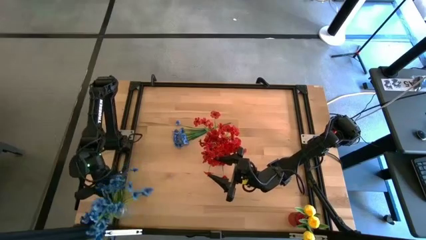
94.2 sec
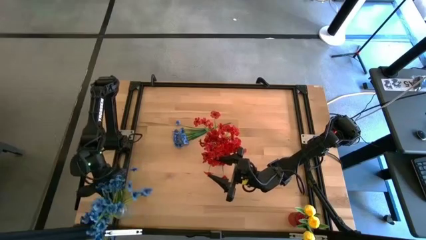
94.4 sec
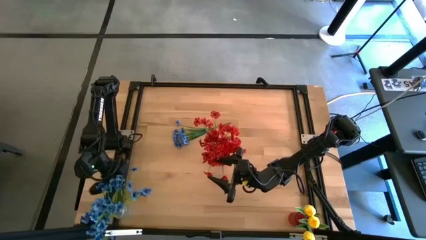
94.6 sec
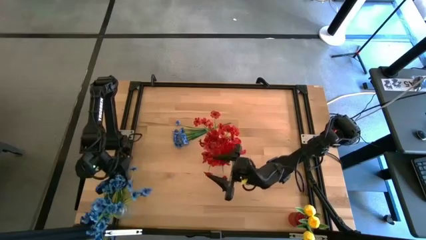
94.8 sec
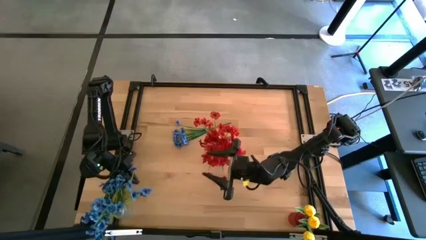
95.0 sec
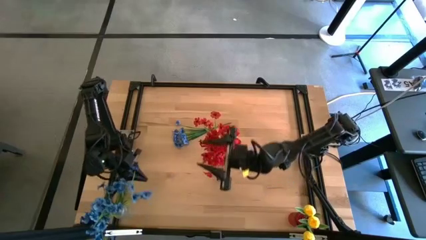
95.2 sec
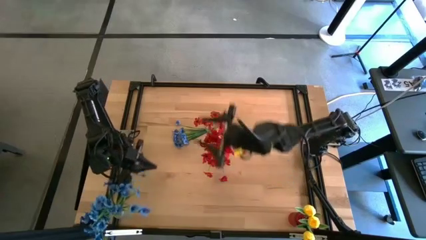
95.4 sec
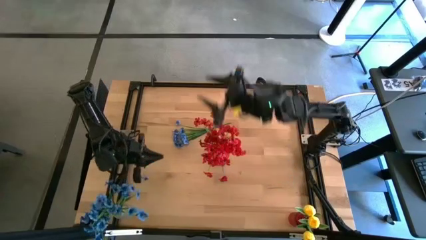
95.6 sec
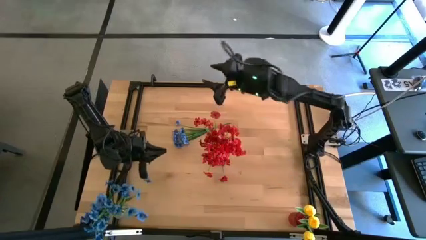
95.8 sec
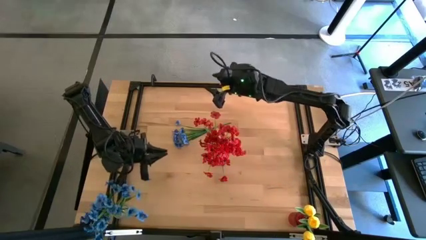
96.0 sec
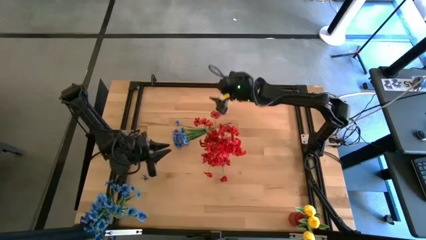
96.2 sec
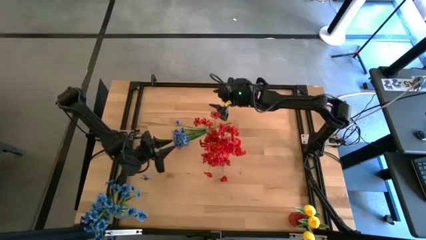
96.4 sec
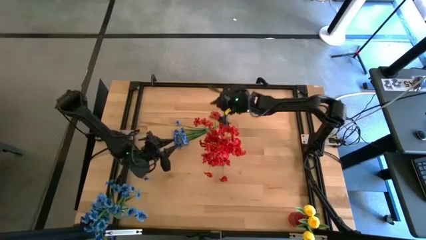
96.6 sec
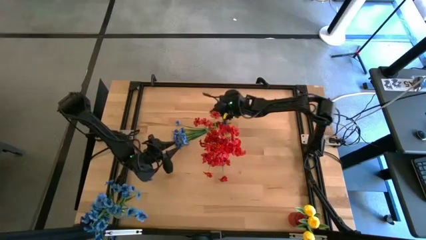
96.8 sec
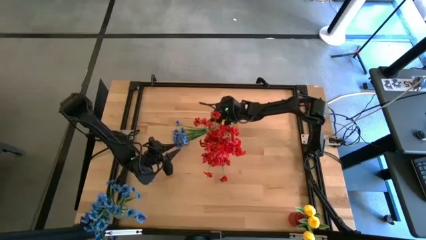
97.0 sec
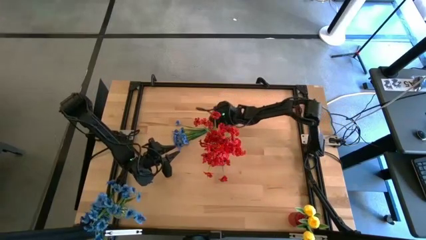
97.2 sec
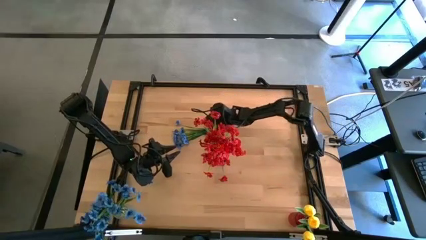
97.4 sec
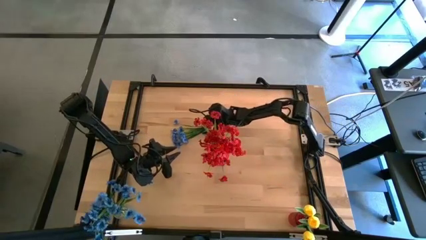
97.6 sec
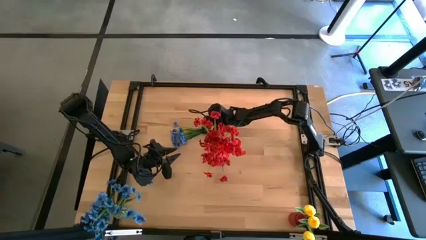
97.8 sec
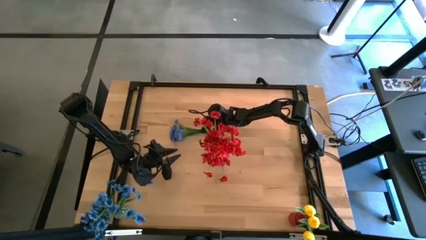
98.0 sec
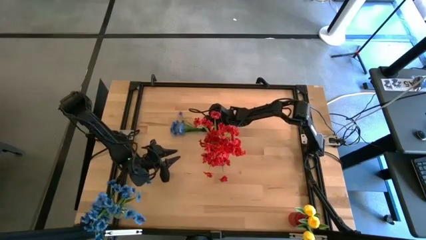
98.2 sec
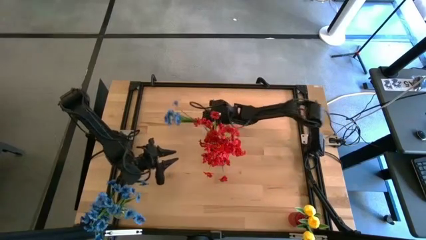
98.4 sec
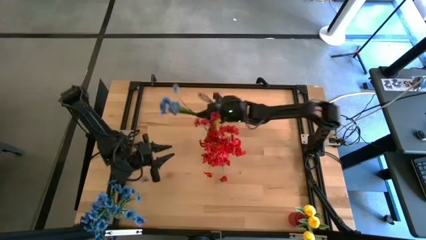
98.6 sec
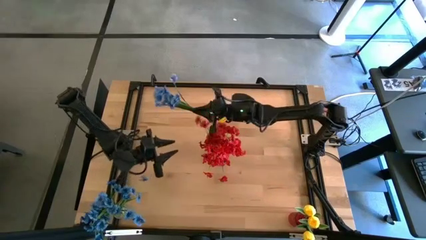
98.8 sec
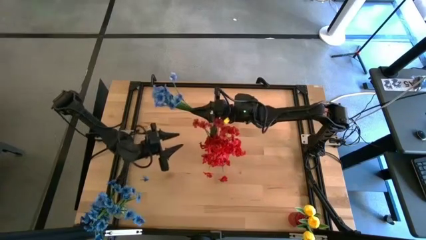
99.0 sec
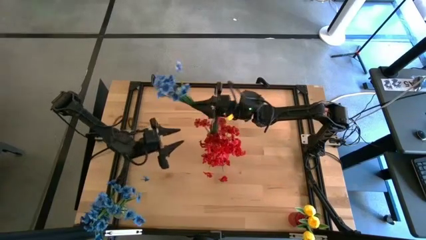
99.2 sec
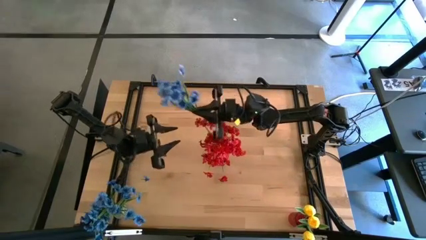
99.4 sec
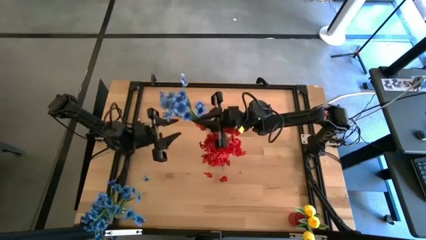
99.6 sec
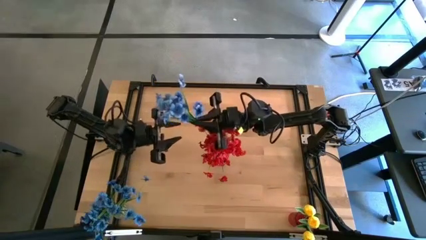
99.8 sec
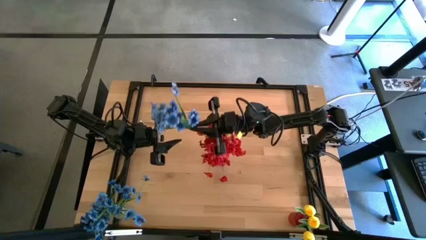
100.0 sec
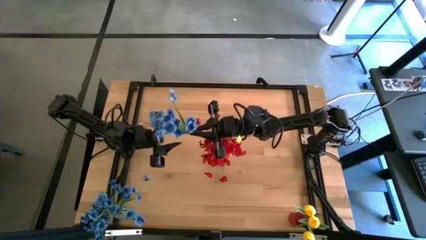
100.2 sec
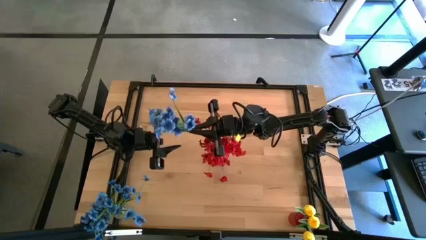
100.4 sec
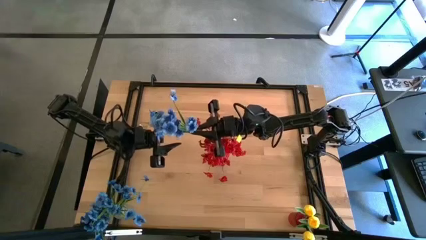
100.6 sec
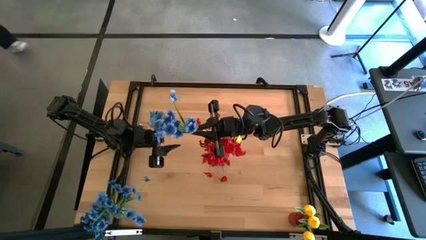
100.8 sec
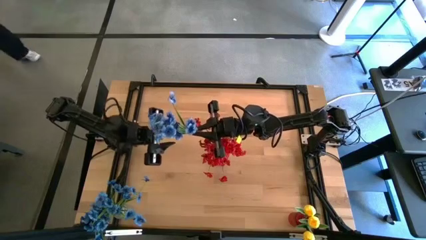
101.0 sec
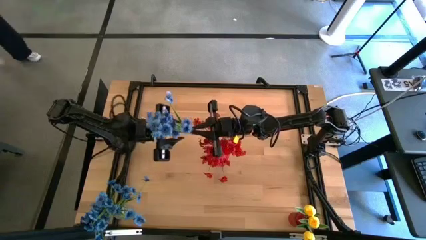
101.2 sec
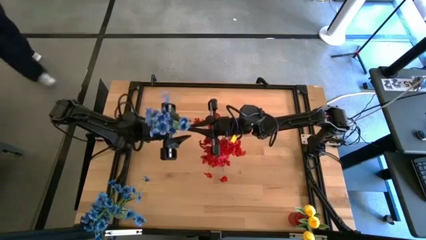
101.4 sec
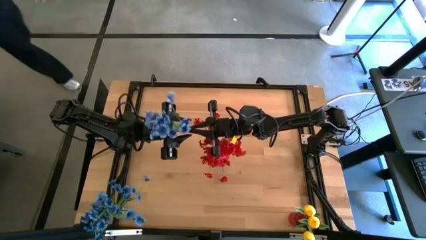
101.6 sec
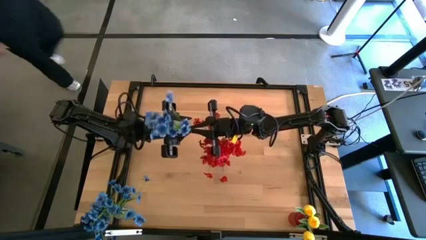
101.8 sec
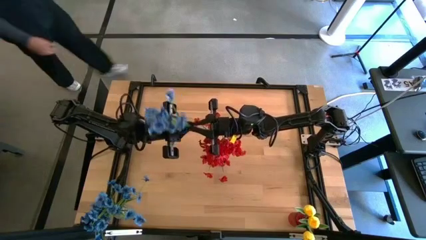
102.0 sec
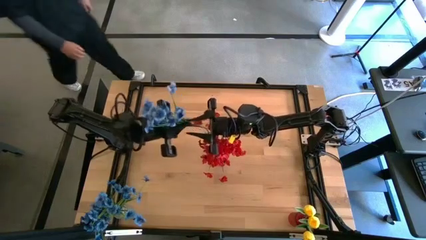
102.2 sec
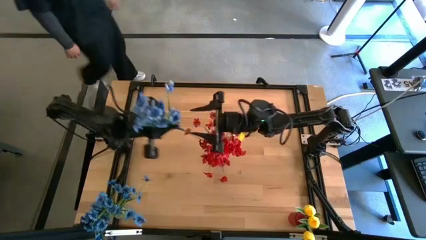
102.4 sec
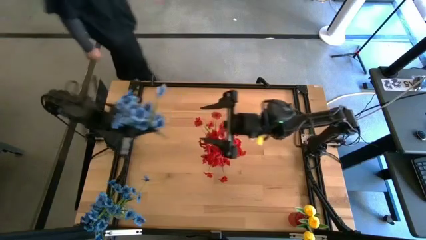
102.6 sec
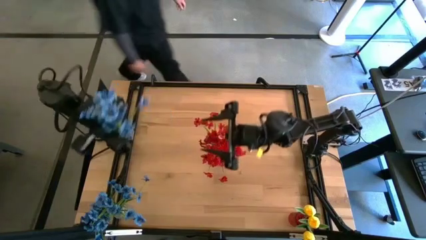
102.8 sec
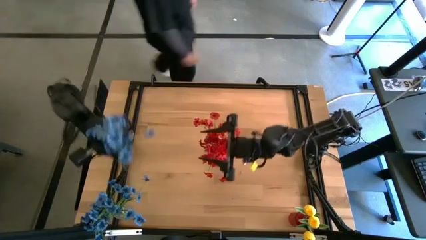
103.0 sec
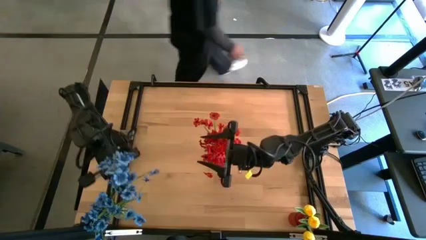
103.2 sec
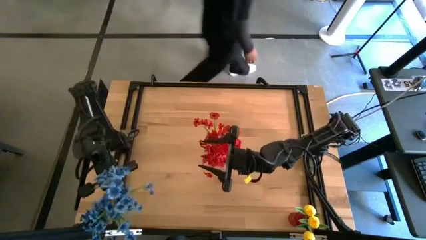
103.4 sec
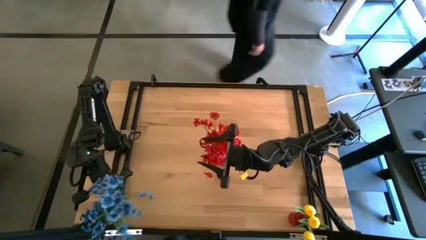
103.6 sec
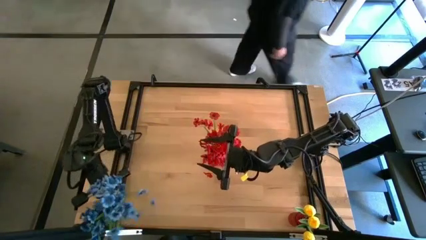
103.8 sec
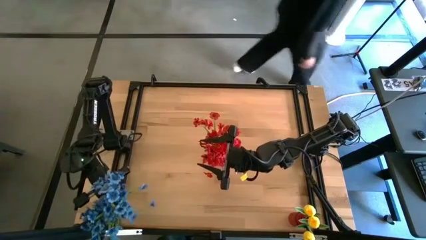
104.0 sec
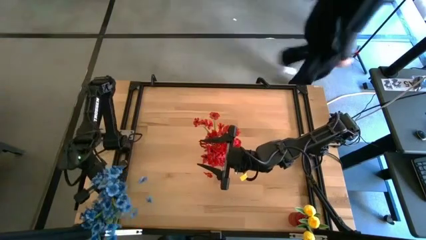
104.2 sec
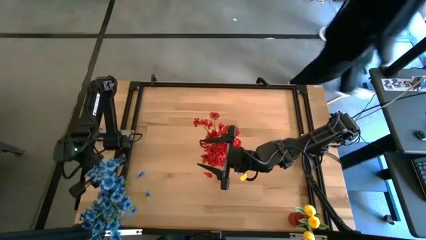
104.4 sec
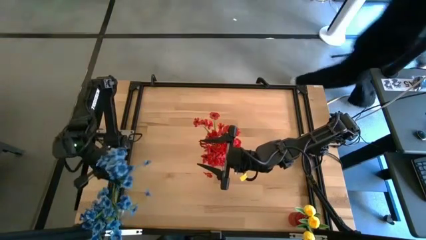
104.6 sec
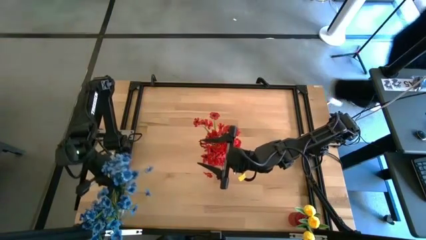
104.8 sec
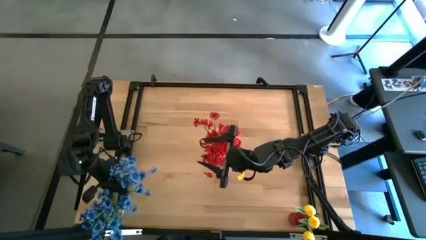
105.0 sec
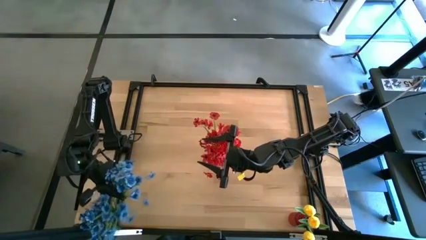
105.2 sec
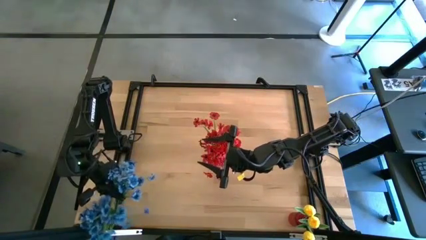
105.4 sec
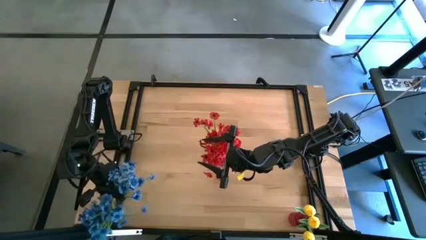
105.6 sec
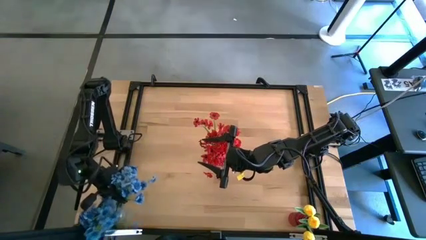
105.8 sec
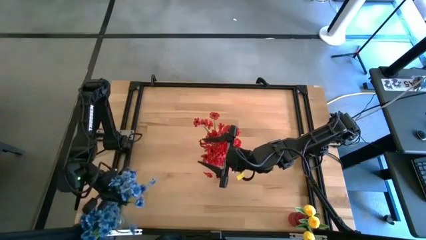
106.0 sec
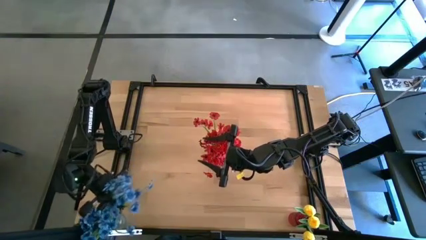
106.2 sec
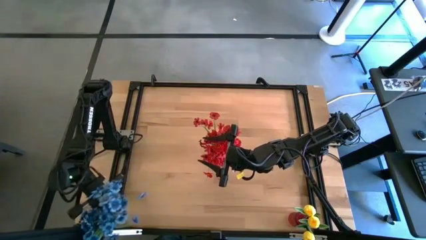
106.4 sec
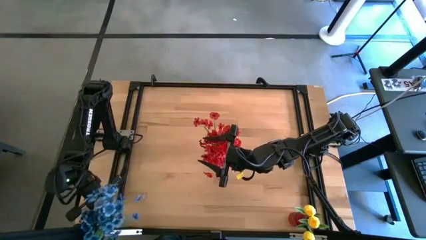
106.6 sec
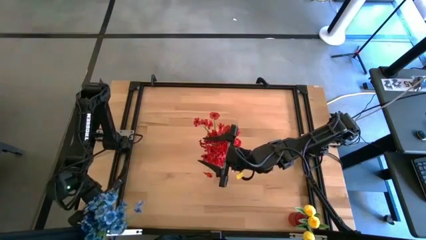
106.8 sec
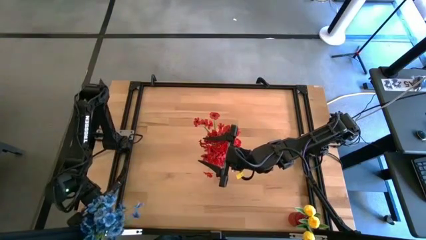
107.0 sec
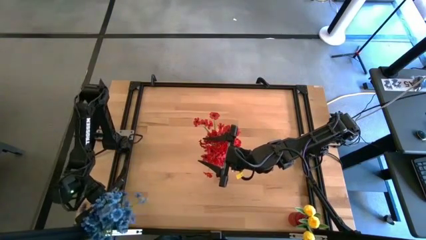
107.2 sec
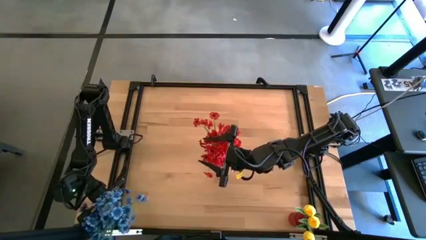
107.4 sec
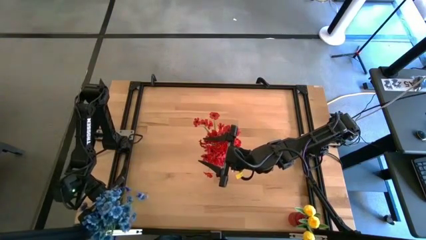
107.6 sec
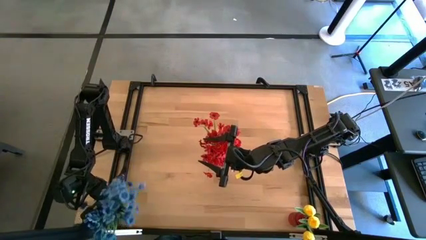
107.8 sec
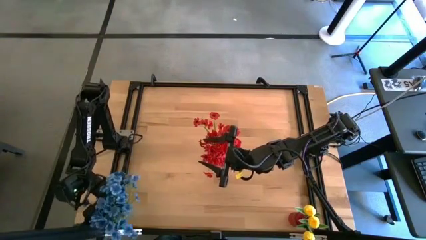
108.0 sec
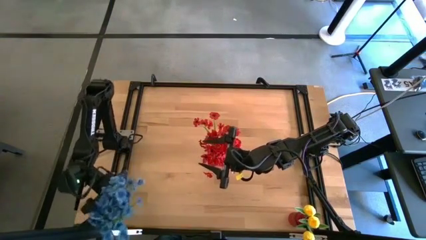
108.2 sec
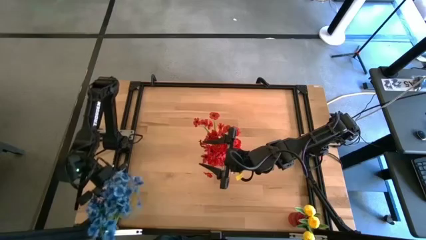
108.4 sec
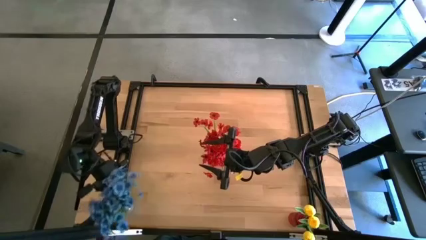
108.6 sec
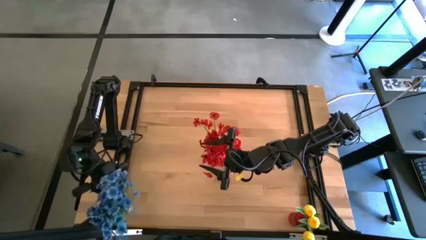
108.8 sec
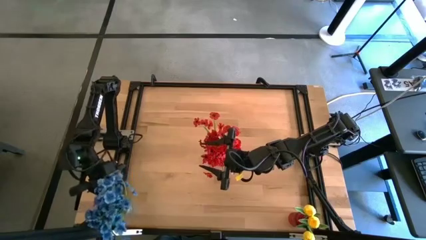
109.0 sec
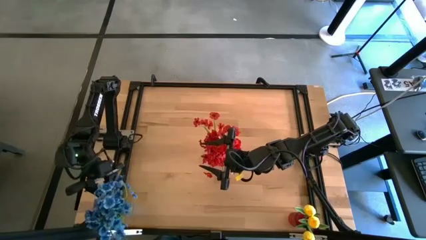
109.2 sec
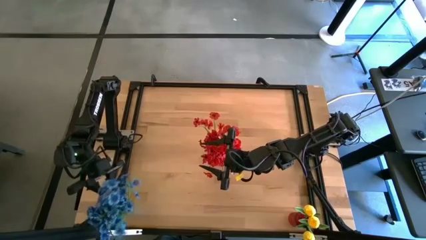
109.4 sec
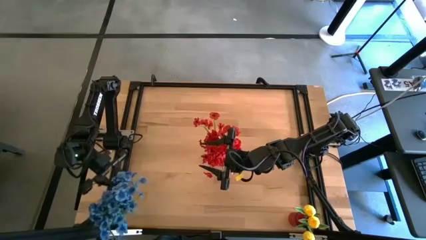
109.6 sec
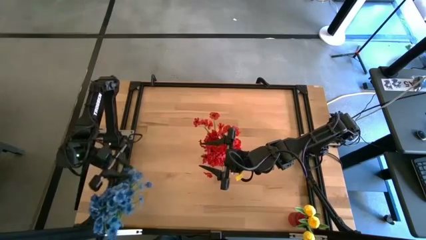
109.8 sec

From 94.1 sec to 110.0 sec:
Task: Sort flowers into vase by color
Put the blue flowers into the transparent vase

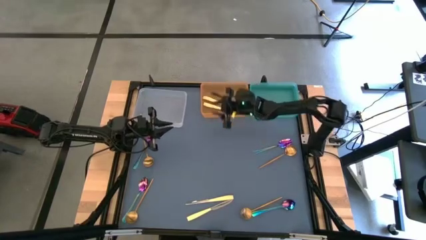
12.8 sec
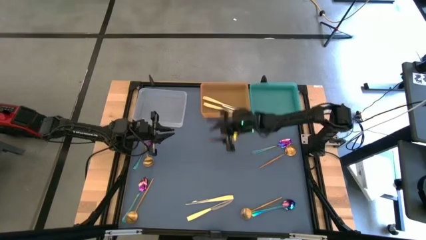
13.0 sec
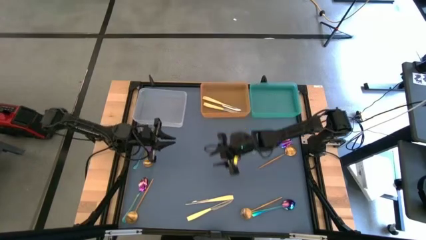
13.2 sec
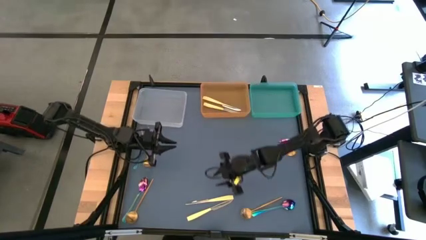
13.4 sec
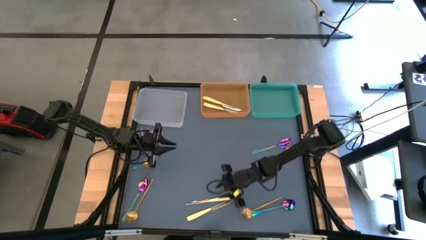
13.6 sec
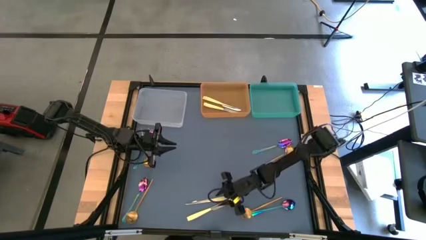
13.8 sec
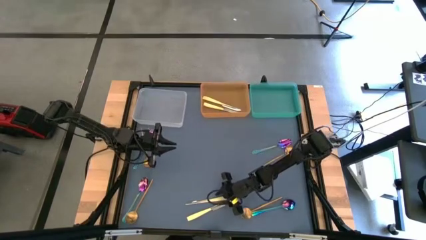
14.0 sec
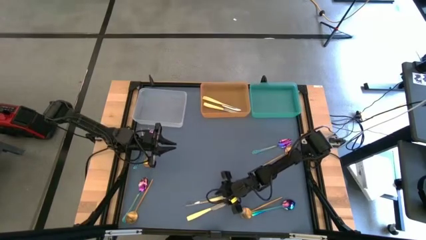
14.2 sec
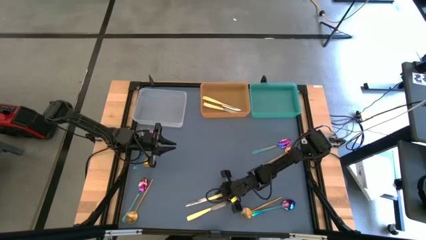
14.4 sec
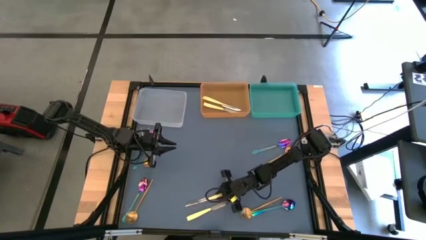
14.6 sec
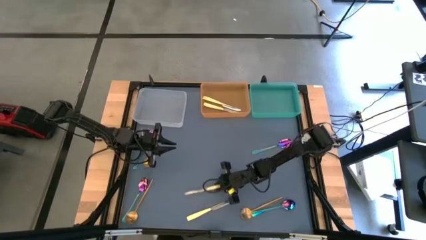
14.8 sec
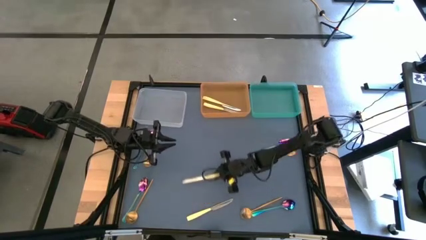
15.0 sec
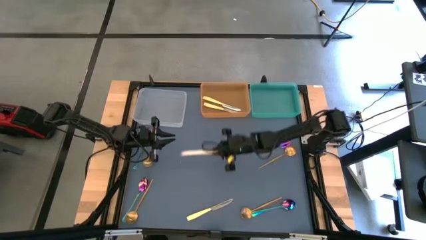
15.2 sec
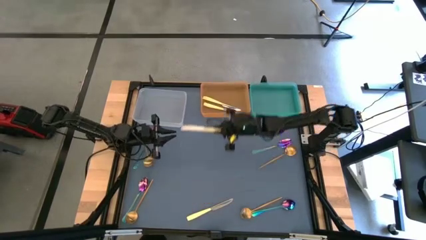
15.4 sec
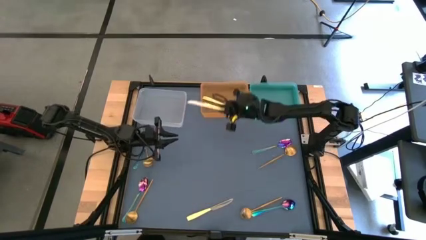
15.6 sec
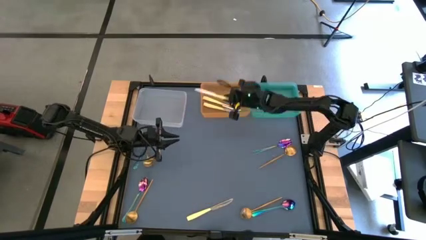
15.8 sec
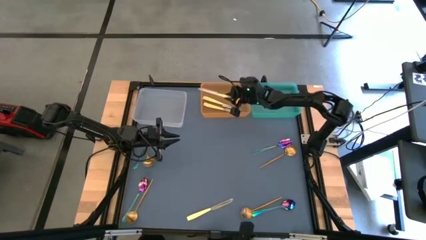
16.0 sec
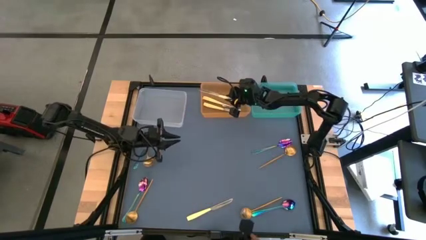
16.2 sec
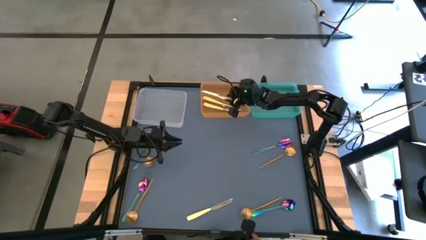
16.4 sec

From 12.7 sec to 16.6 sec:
Task: Sort silverware by color (type)
Put the yellow table knife into the orange bin
